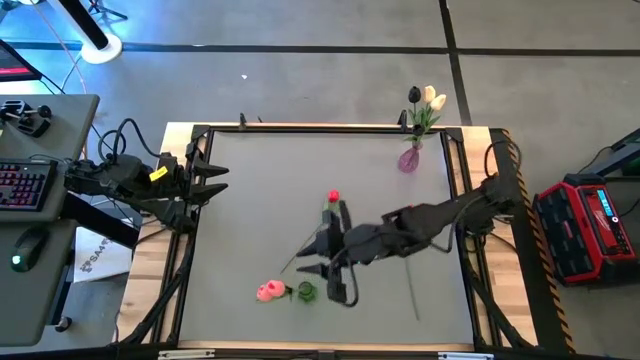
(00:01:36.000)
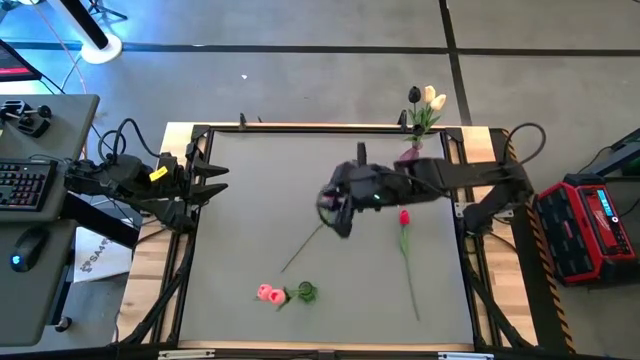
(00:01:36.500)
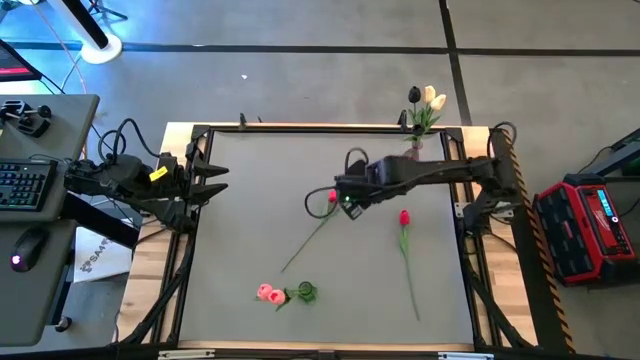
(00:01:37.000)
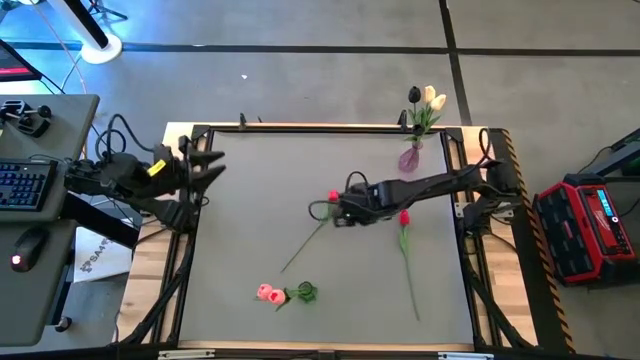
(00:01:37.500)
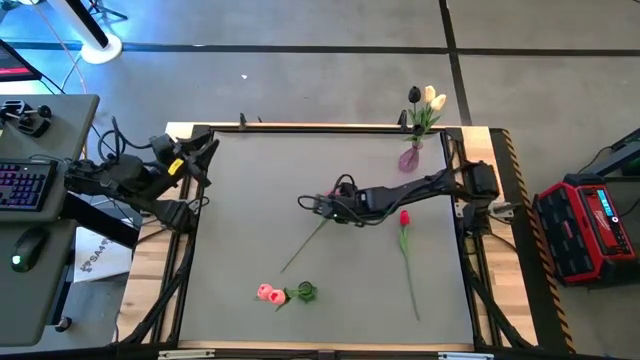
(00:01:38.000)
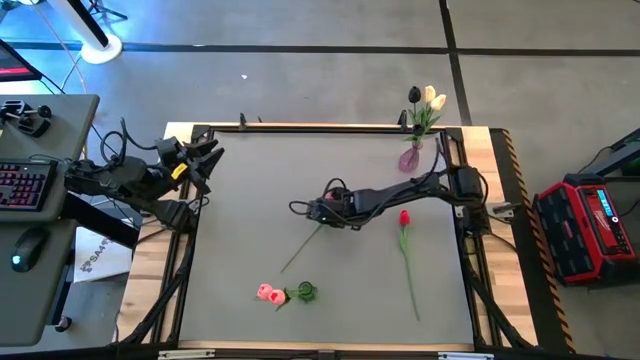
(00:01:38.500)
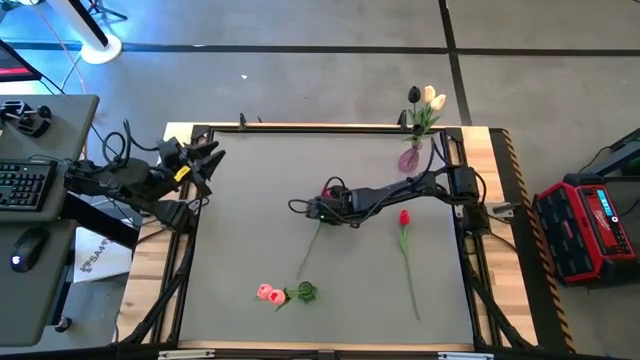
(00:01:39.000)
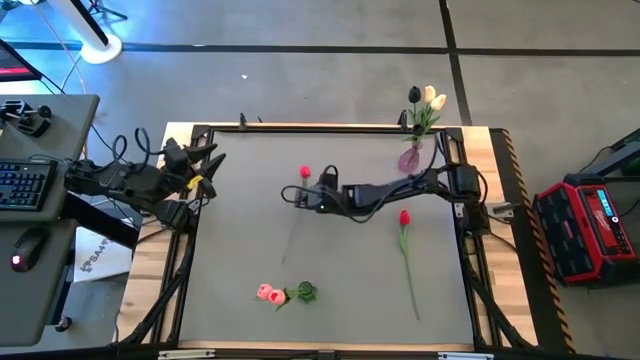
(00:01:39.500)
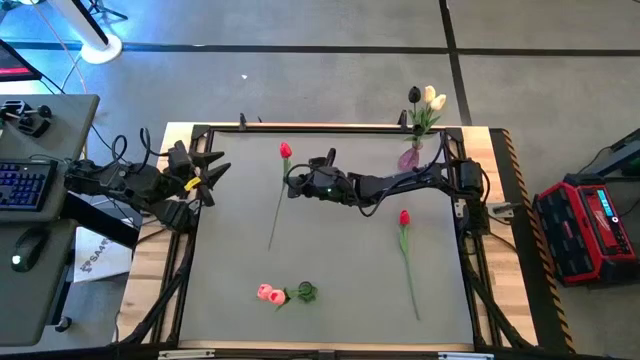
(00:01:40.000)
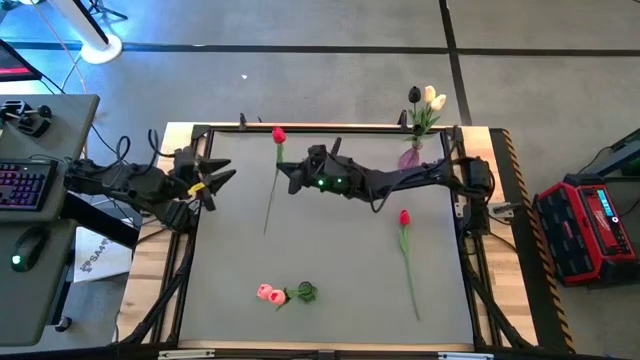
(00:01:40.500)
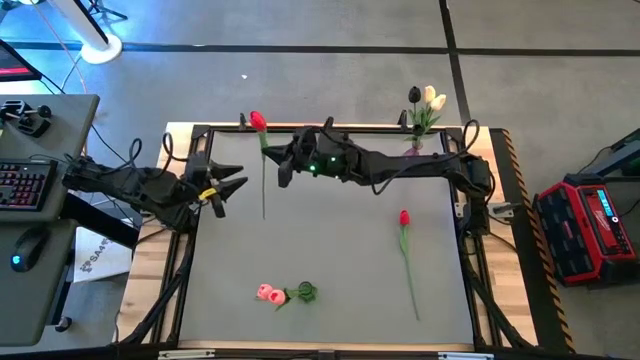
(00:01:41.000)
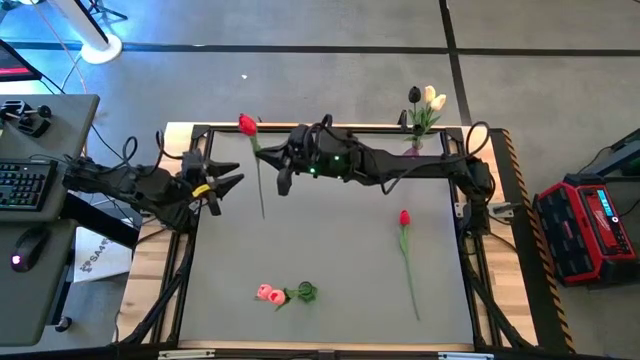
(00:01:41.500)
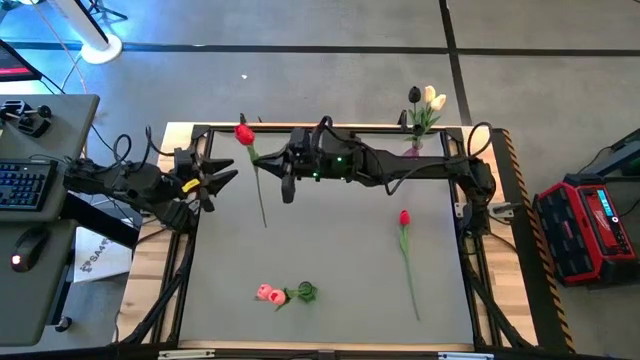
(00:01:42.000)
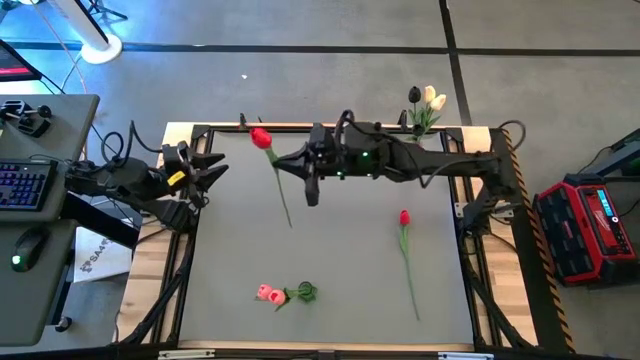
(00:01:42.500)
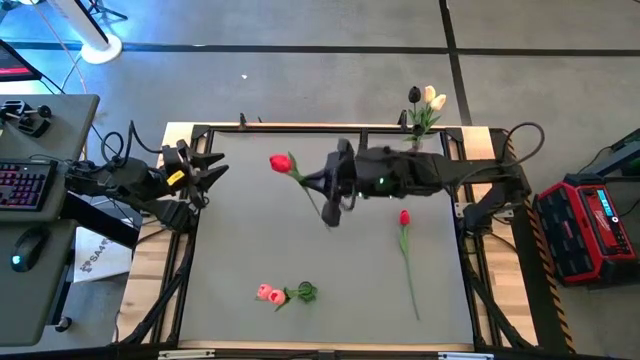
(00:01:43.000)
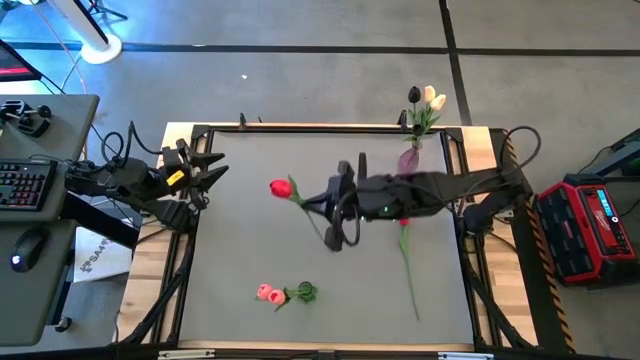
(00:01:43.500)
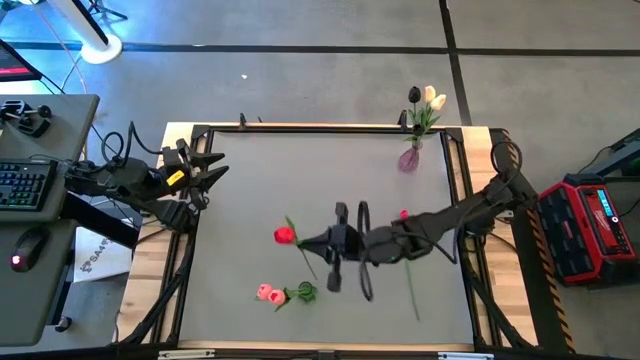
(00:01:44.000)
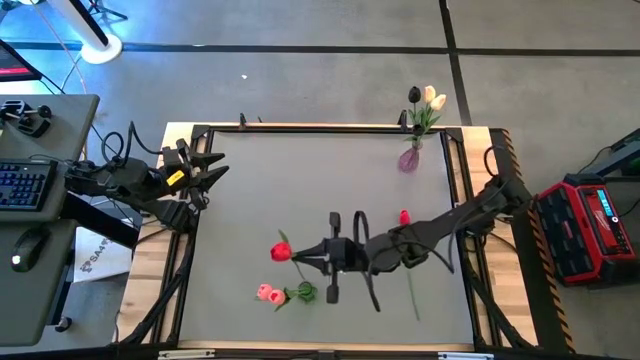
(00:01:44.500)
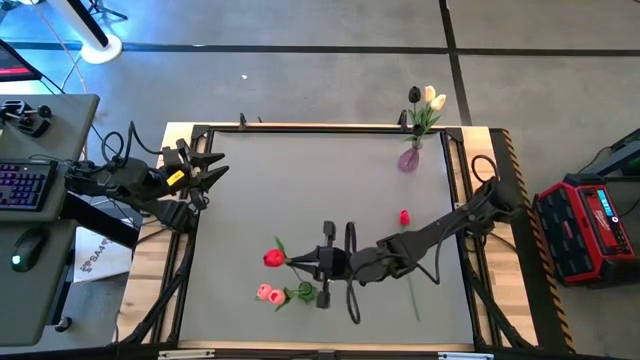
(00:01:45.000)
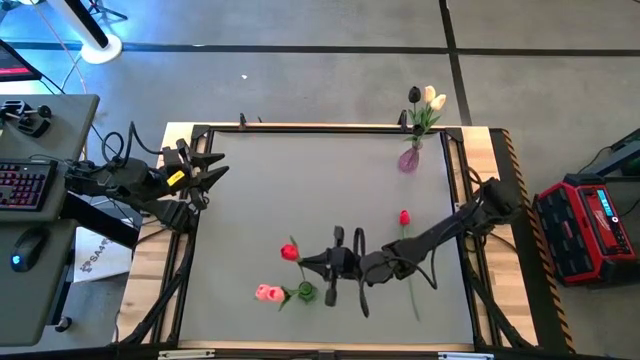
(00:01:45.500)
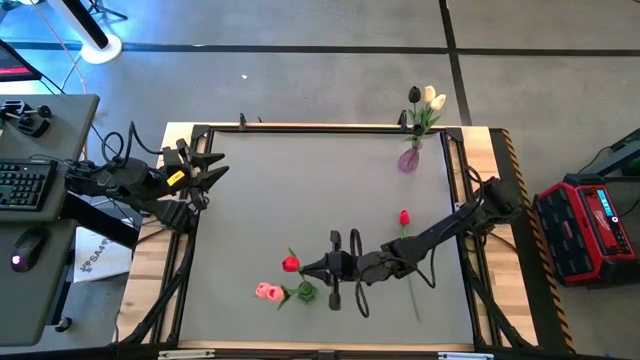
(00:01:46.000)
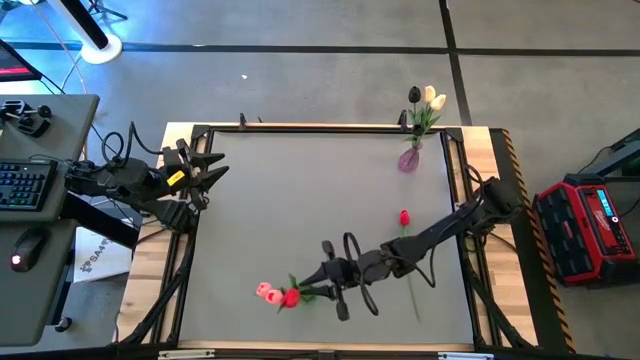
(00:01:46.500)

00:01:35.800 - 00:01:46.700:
Task: Sort flowers into vase by color
Put the left red flower into the green vase

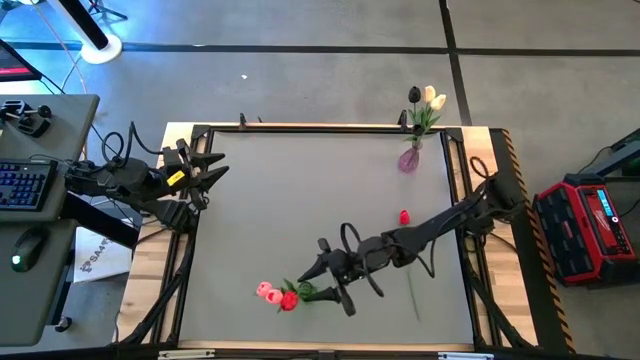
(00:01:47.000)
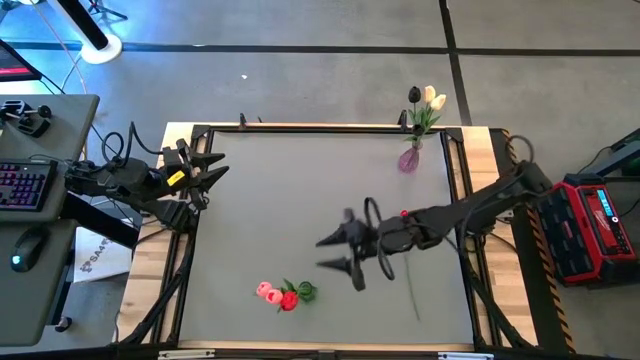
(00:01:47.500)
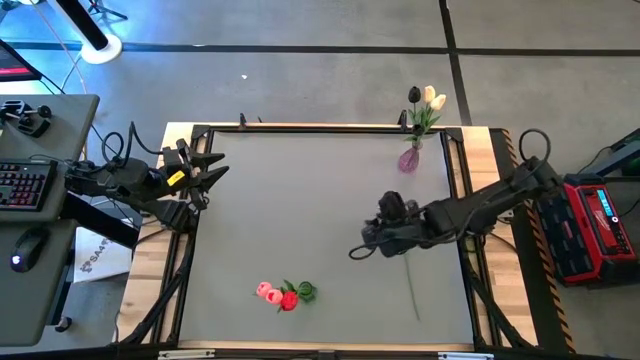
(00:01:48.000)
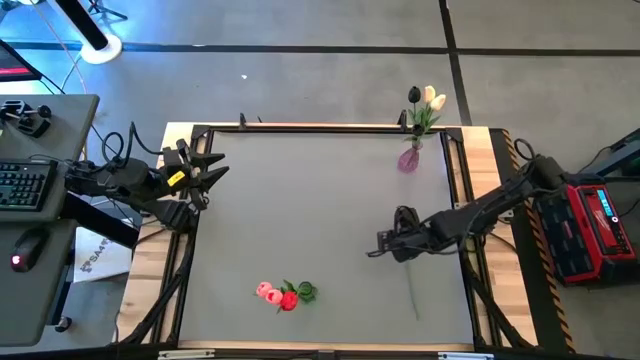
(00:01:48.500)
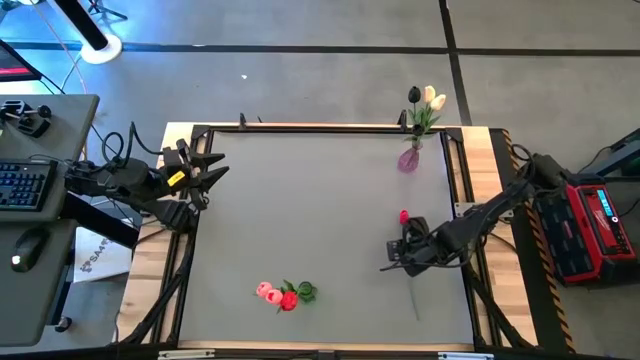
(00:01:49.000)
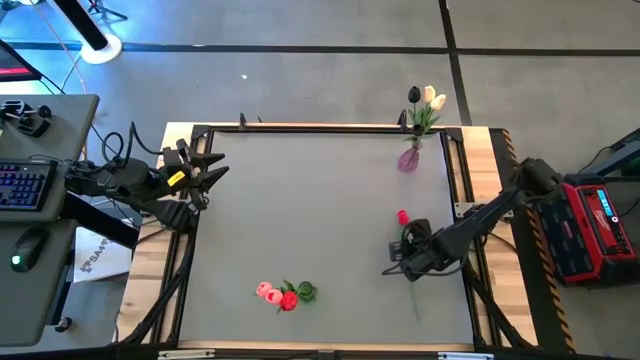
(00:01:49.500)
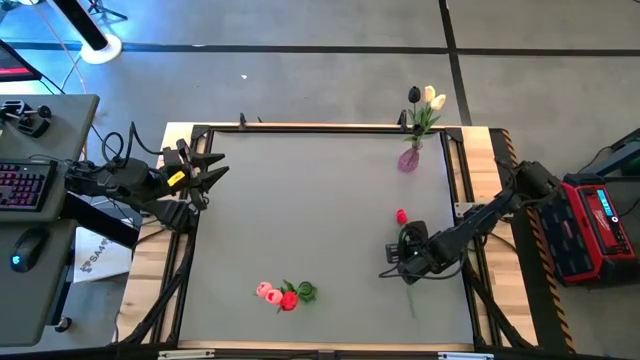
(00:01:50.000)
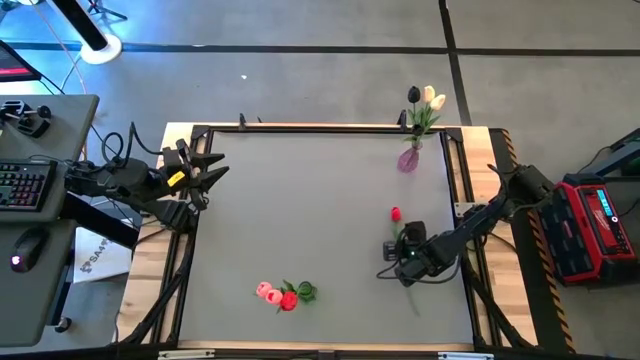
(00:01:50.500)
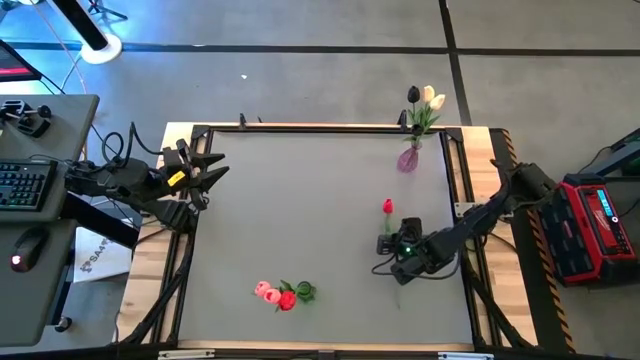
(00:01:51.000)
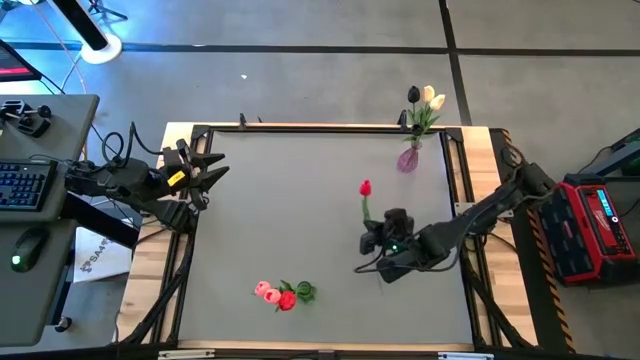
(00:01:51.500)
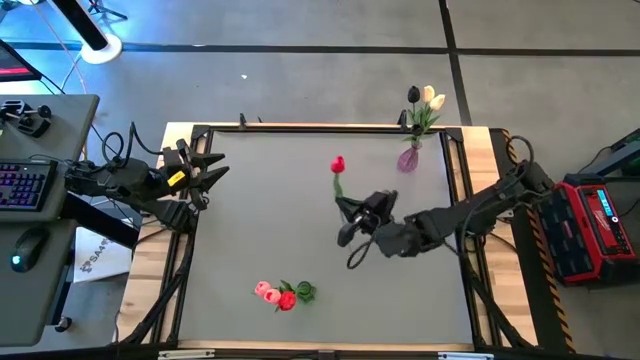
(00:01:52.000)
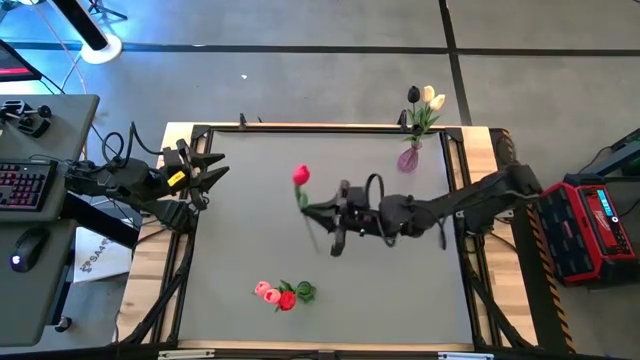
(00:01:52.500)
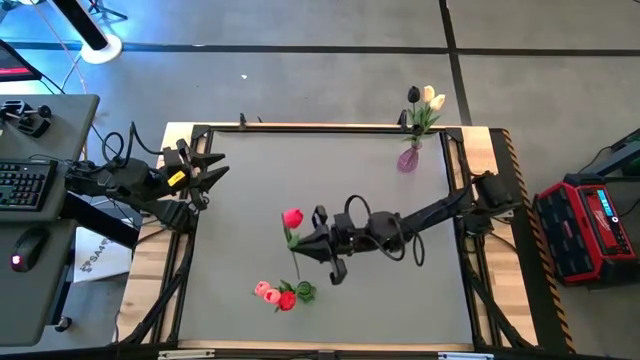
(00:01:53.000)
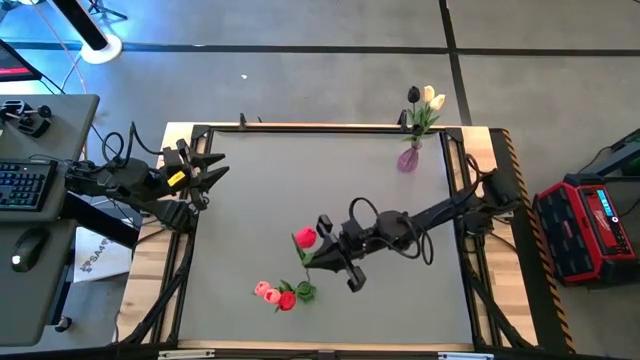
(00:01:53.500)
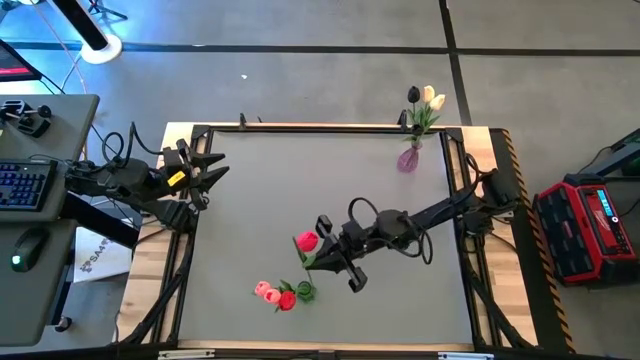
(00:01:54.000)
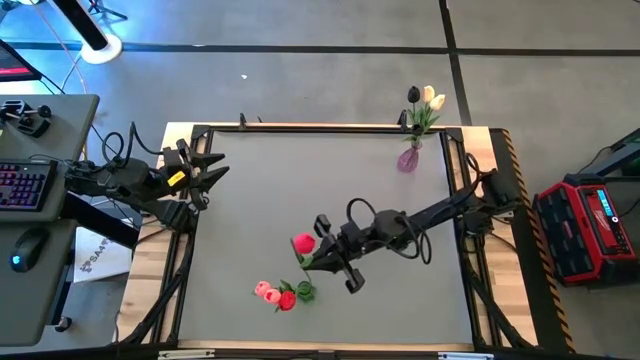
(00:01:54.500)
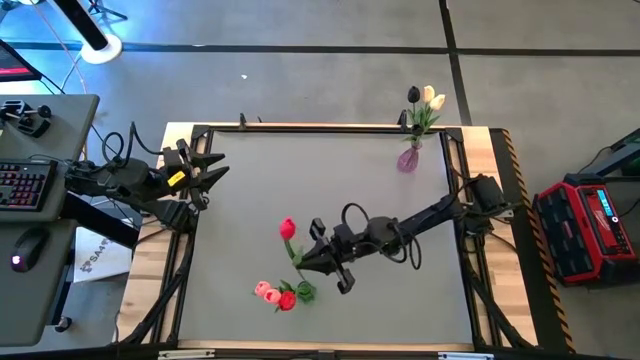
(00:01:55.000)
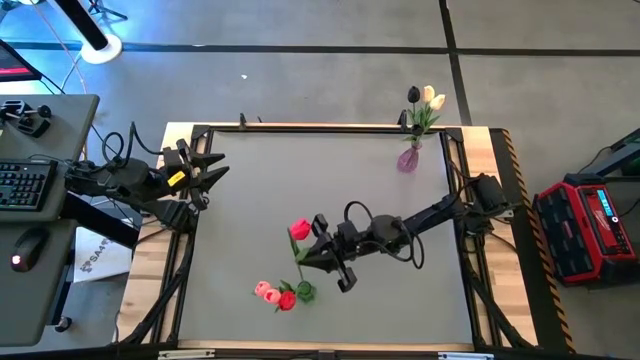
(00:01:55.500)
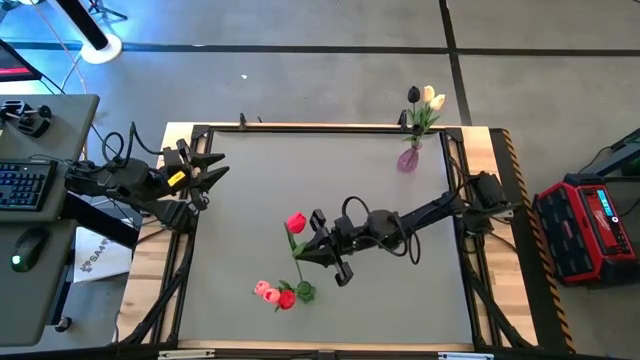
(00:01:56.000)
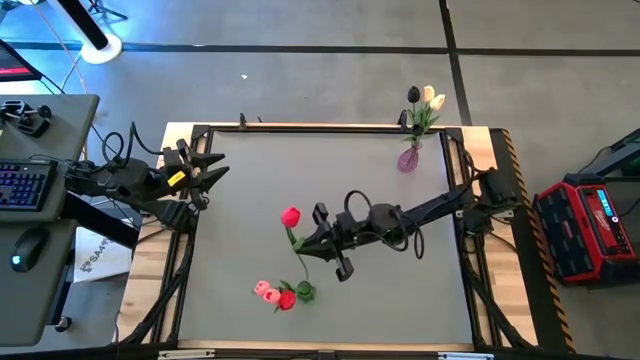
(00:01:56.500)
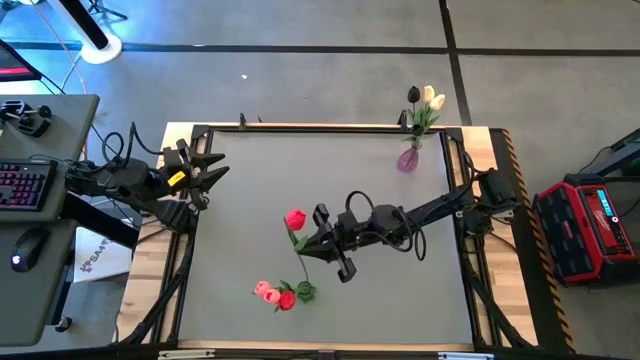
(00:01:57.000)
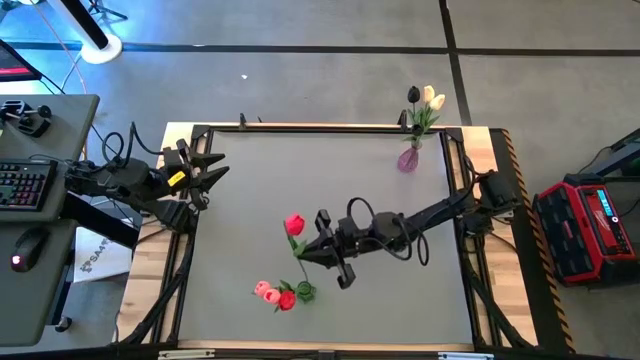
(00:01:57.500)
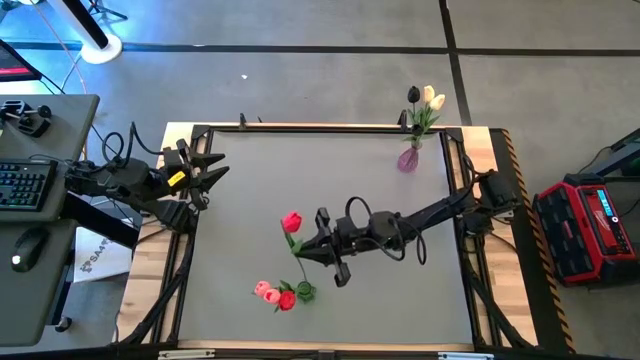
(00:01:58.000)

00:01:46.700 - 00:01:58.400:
Put the red flower into the green vase
